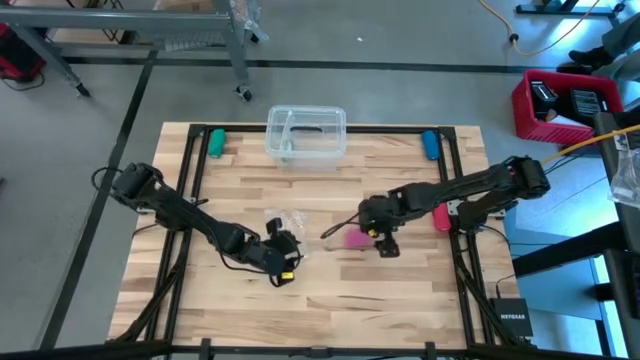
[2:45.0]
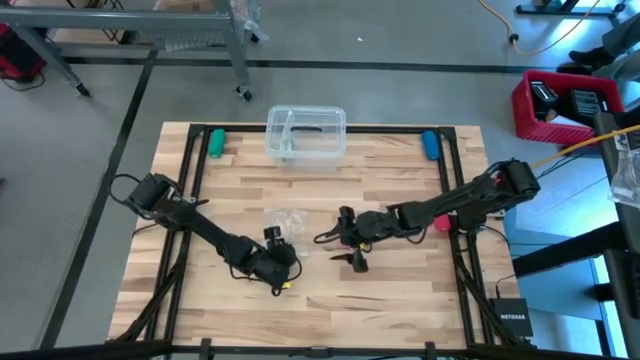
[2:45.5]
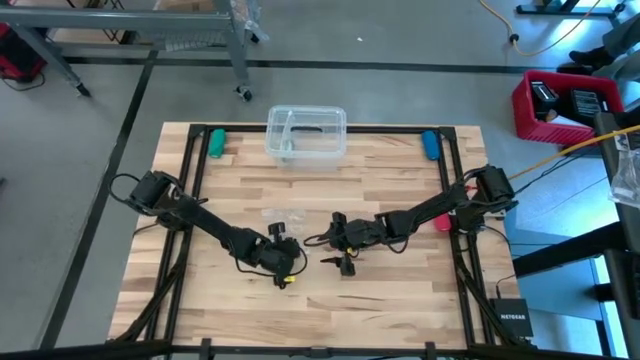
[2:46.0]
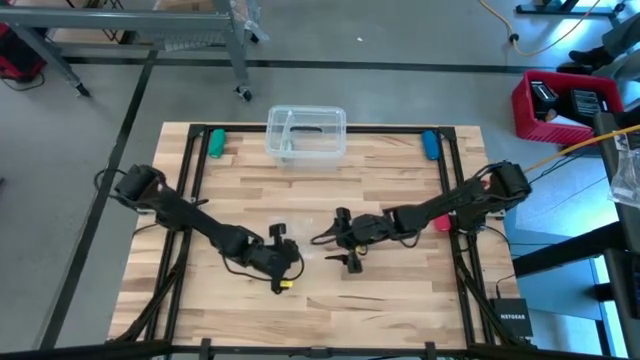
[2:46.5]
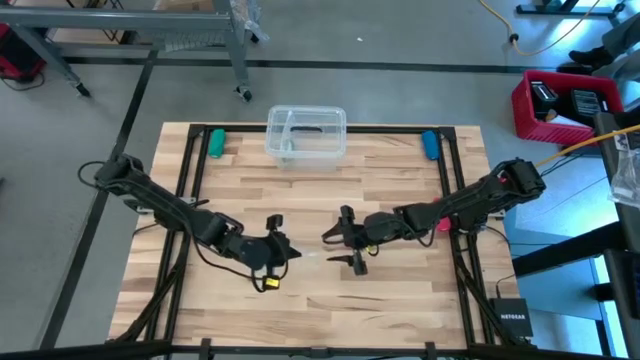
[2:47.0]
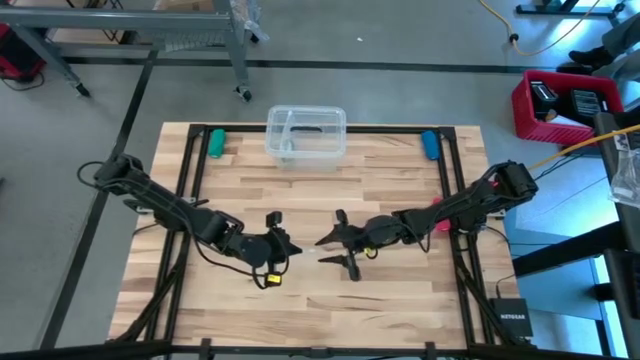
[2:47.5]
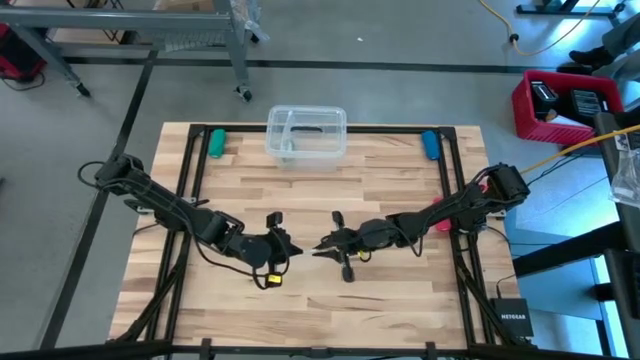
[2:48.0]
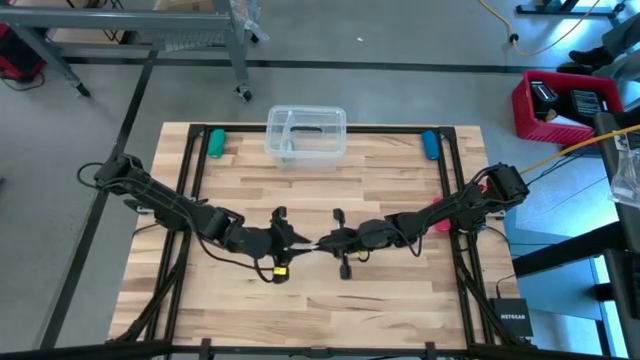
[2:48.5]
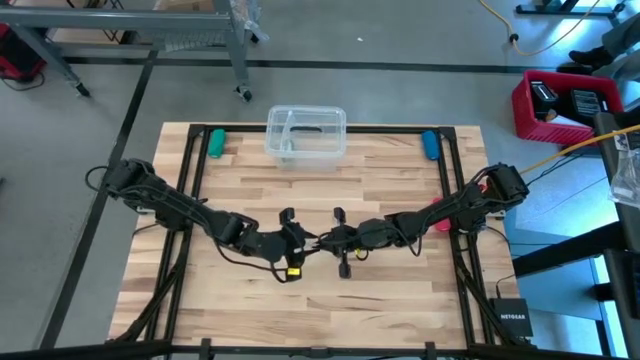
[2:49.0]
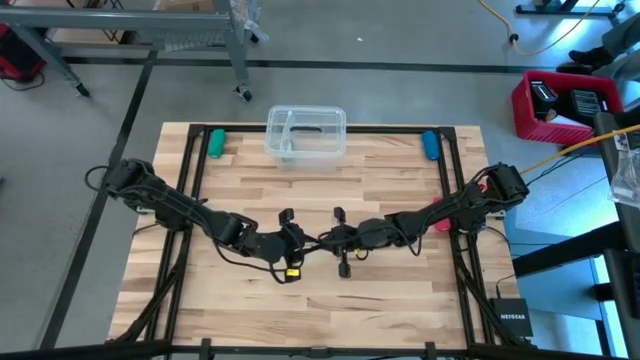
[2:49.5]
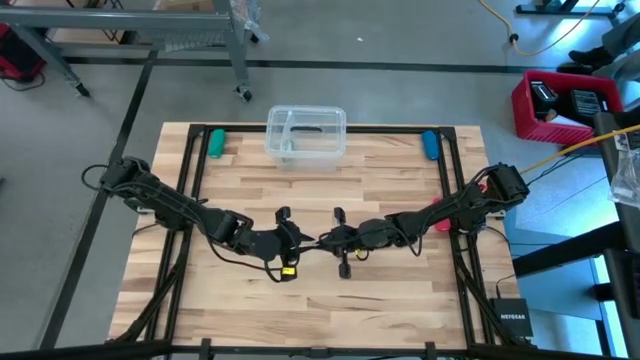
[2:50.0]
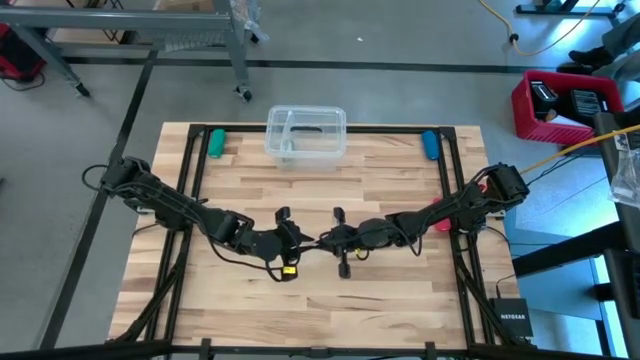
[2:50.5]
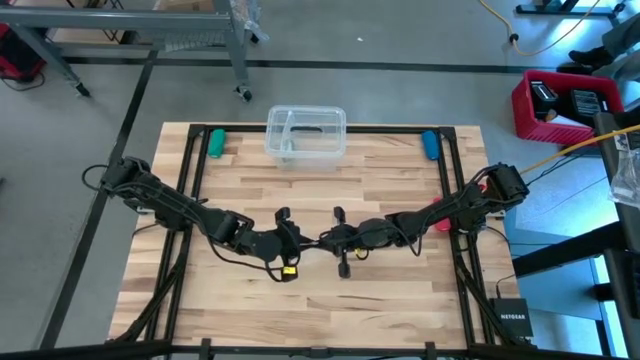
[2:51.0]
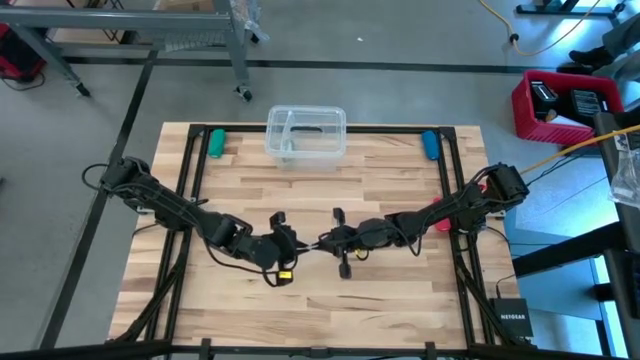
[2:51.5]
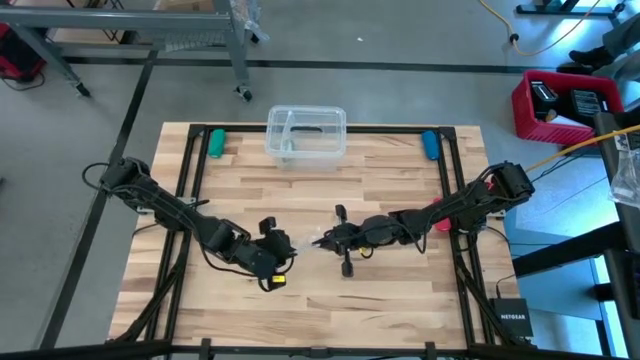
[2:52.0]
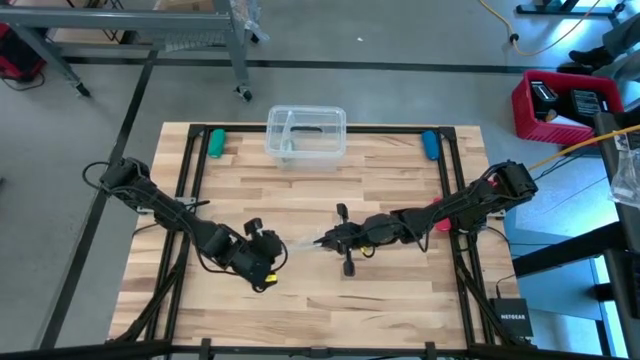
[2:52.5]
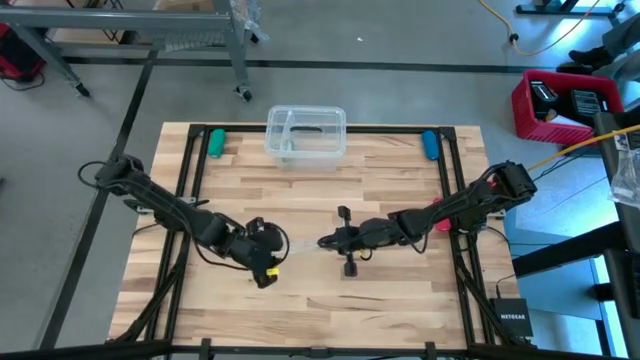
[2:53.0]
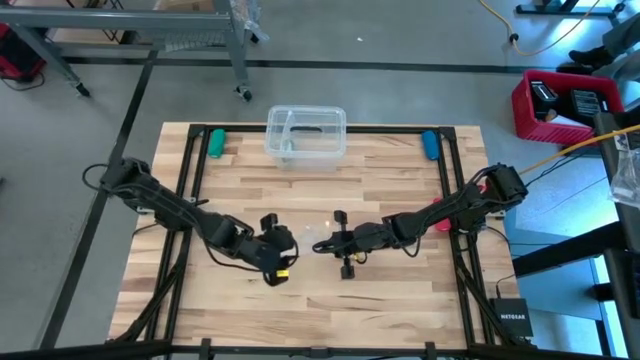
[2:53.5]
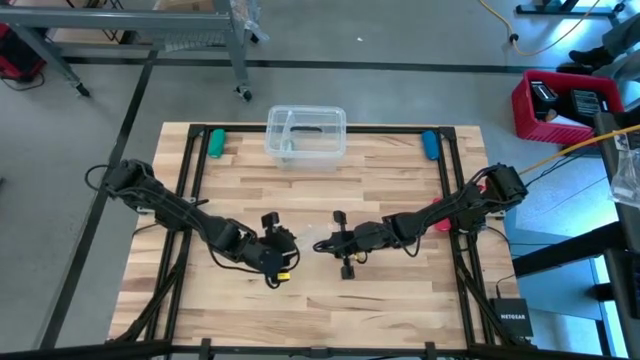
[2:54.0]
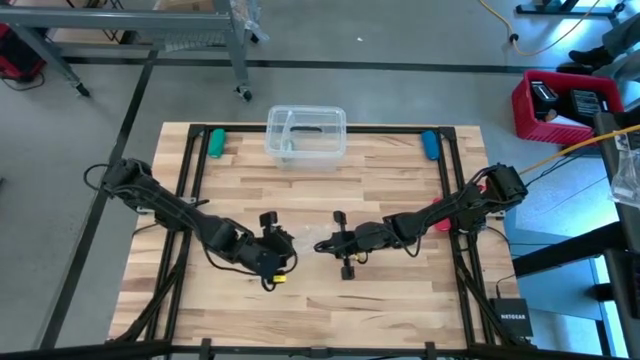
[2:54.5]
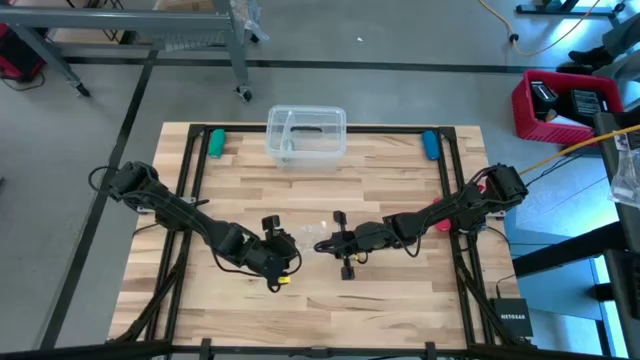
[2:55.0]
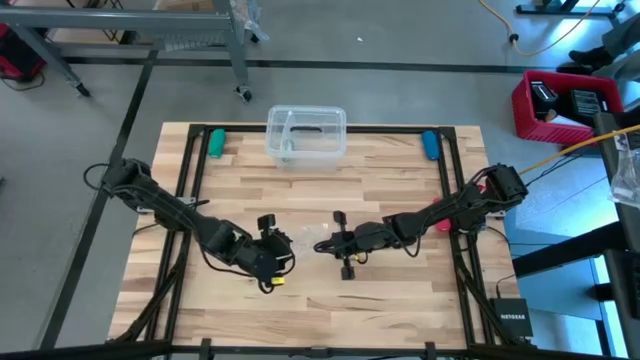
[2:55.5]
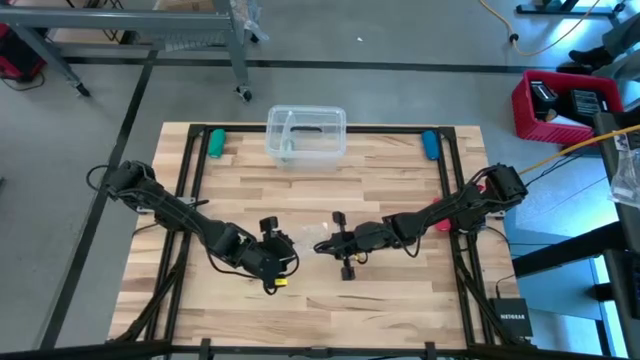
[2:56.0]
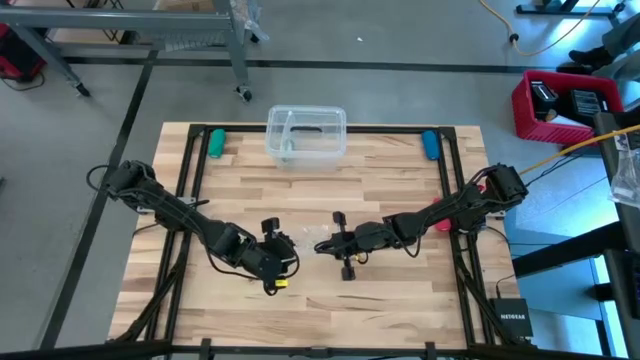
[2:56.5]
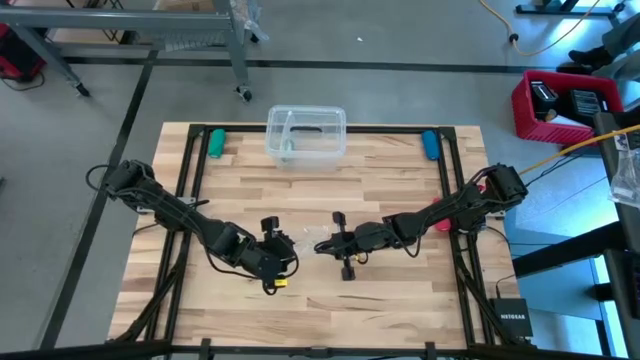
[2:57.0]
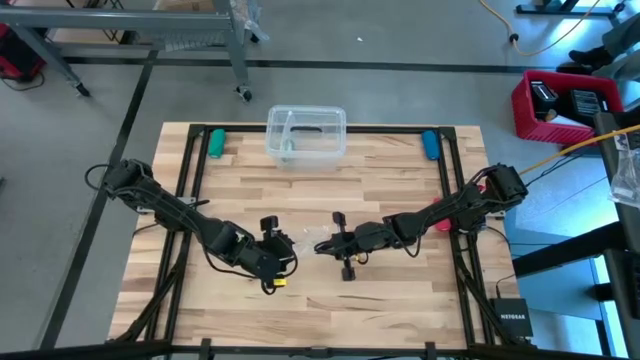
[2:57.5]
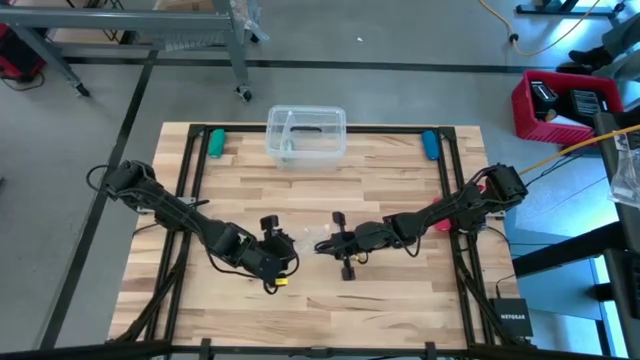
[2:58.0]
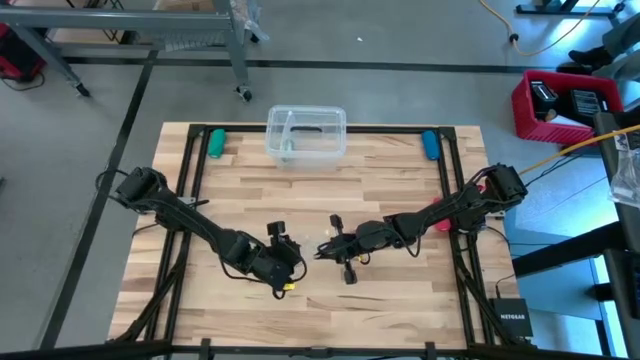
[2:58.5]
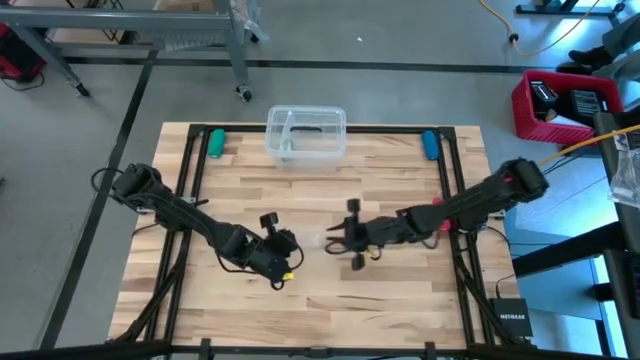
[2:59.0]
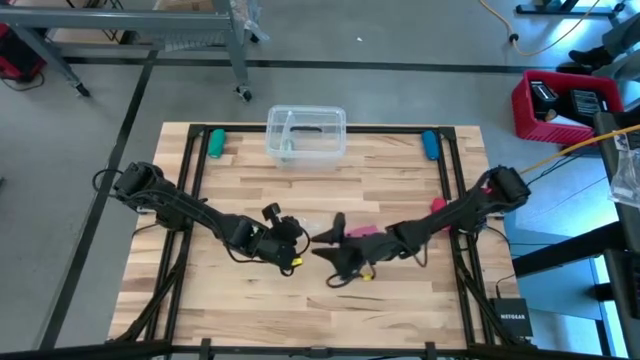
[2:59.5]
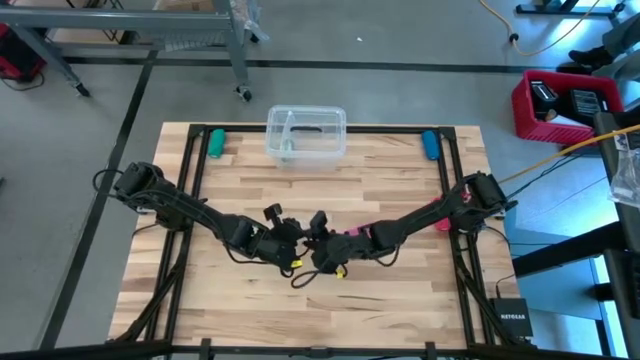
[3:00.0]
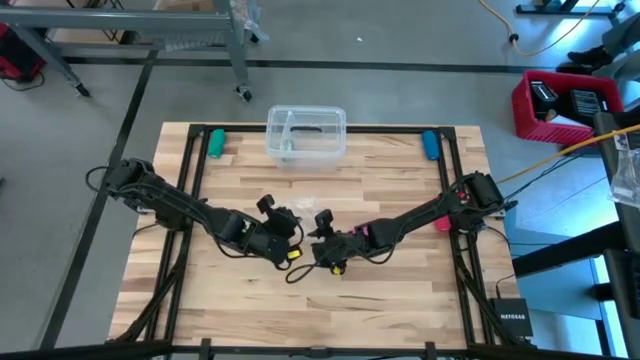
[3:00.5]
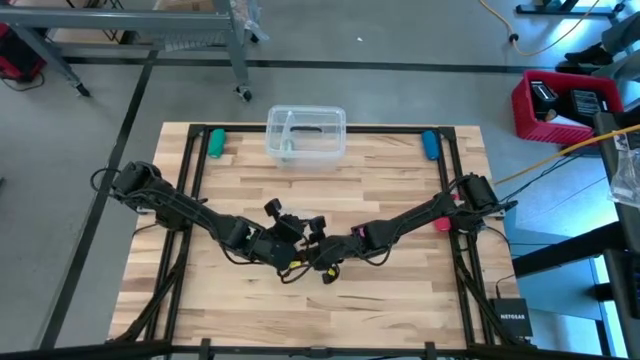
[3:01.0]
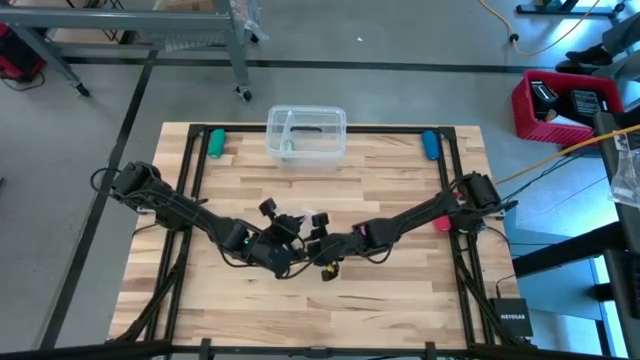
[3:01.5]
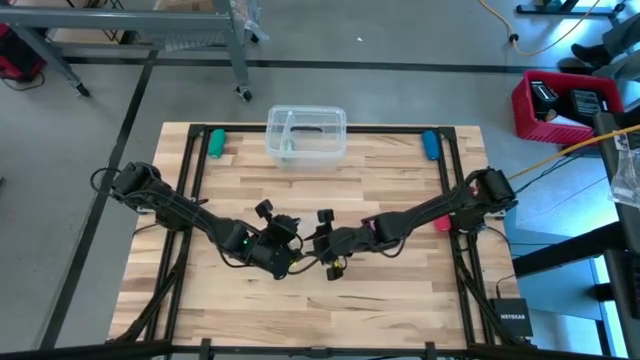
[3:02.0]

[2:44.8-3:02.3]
Task: Roll bandage
Open transparent zip bag

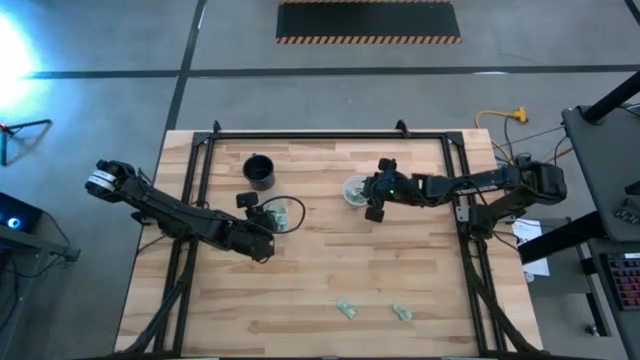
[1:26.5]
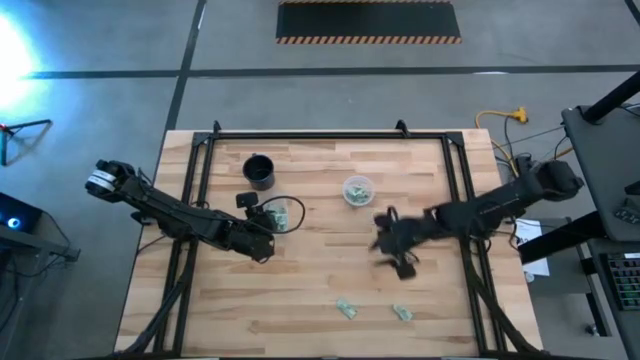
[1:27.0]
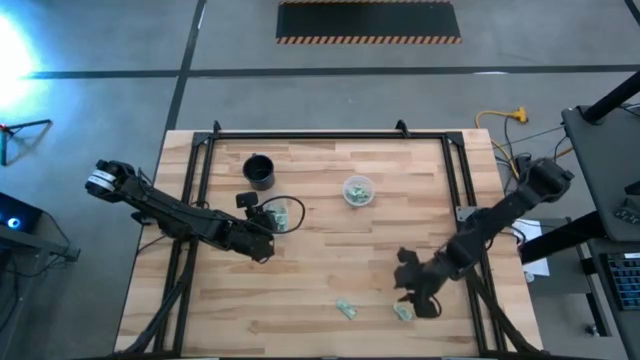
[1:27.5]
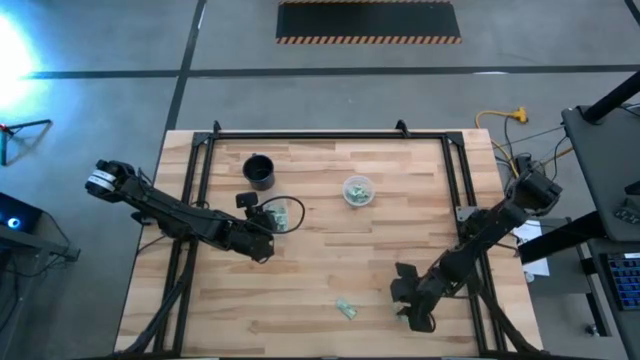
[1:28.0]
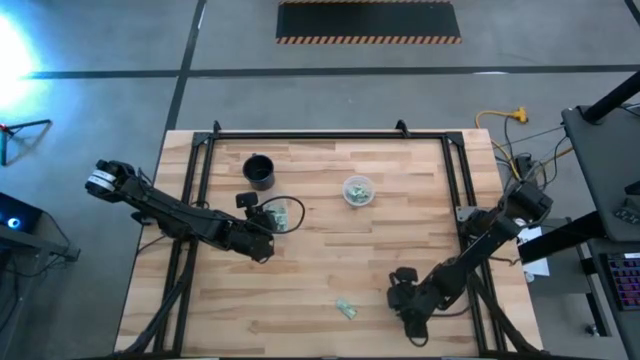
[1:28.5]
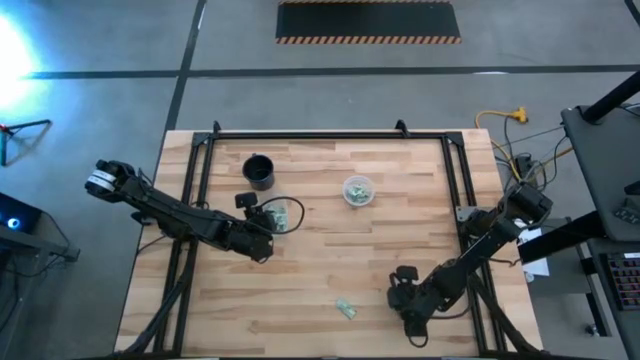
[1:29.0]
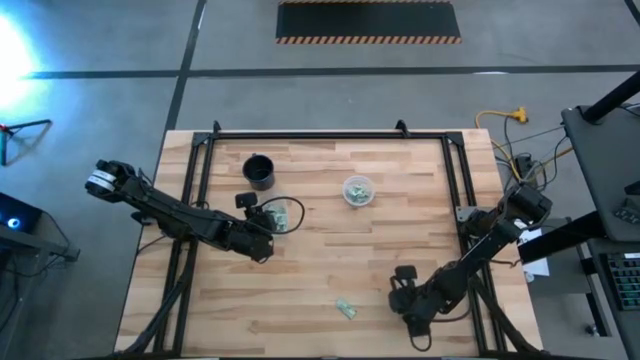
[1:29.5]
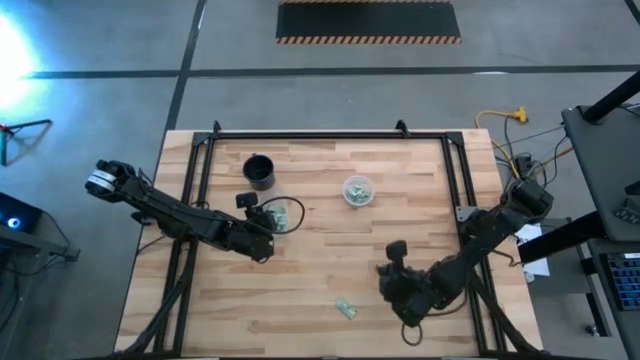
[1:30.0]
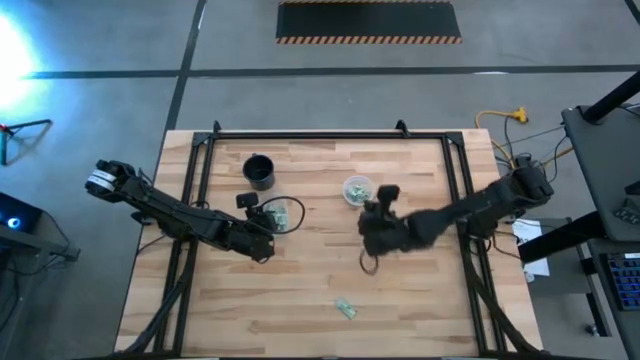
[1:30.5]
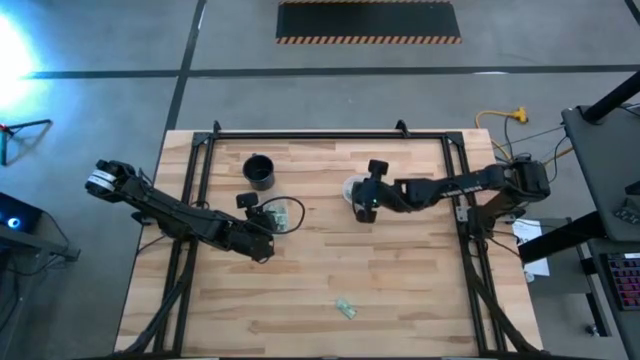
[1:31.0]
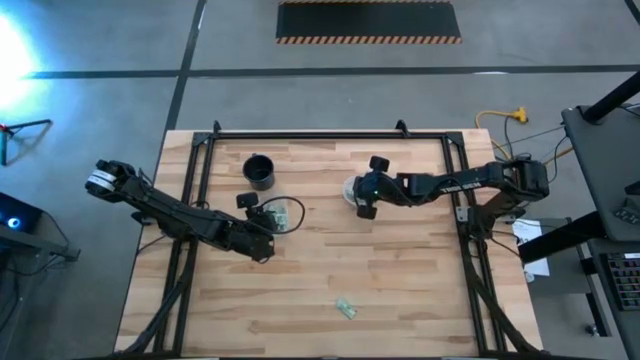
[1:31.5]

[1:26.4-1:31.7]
Task: Pick and place items into bin
Put the stevia packet into the right transparent bin
